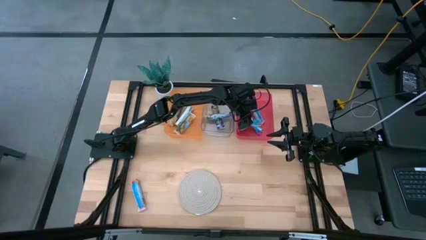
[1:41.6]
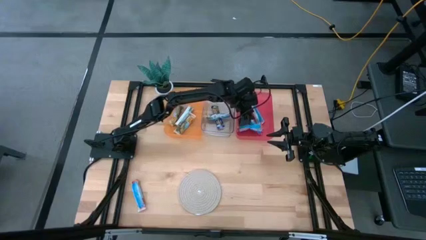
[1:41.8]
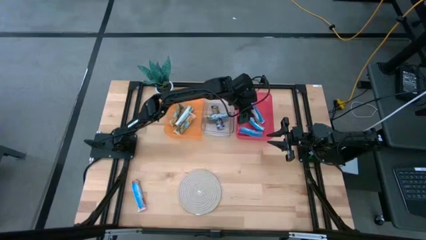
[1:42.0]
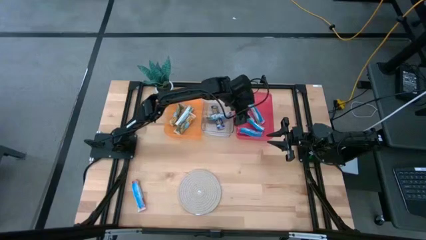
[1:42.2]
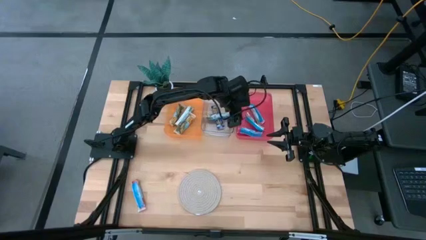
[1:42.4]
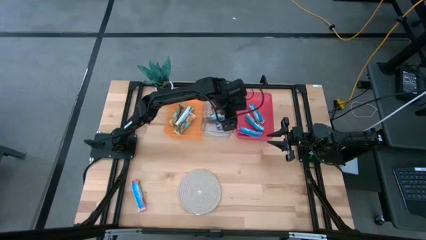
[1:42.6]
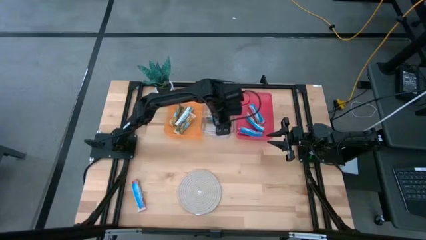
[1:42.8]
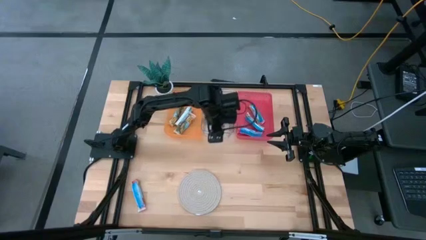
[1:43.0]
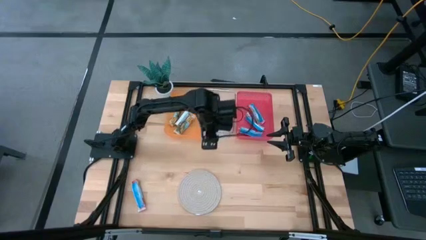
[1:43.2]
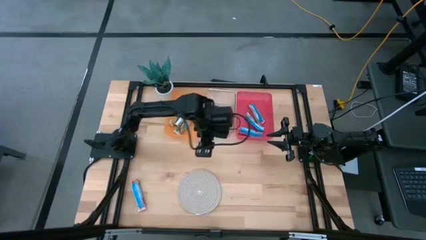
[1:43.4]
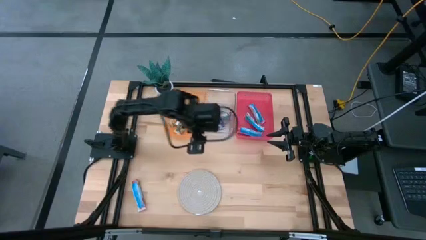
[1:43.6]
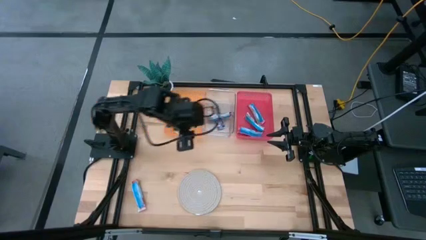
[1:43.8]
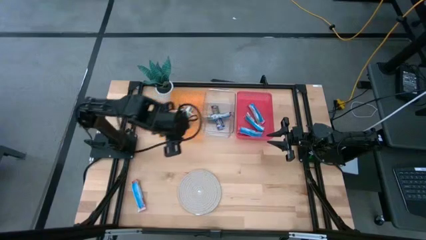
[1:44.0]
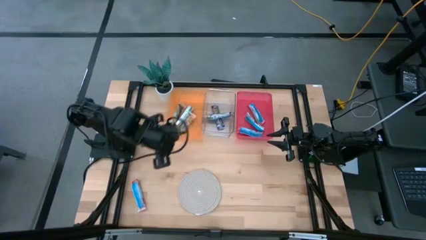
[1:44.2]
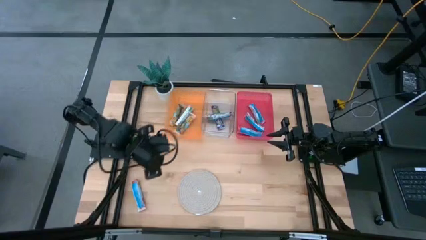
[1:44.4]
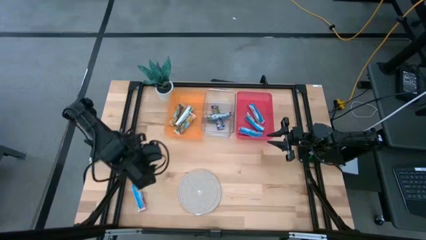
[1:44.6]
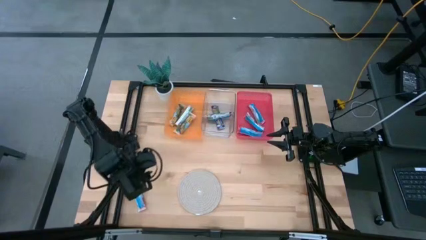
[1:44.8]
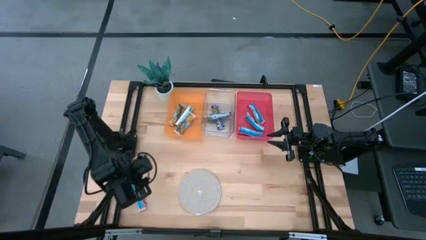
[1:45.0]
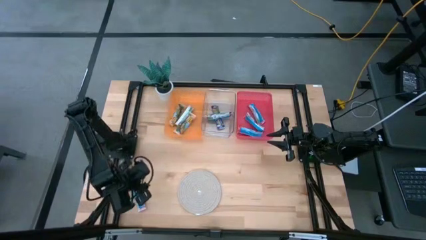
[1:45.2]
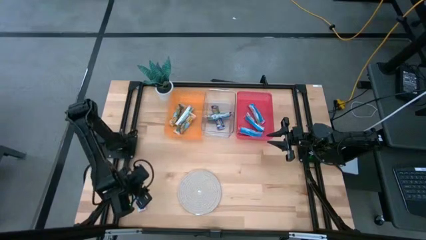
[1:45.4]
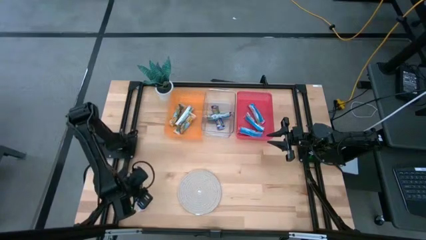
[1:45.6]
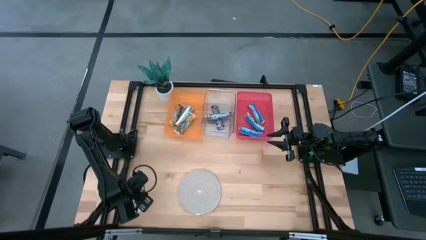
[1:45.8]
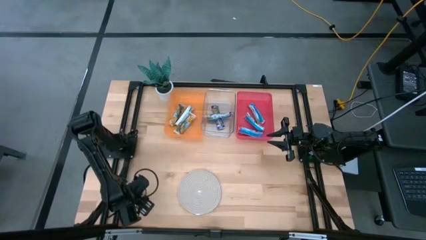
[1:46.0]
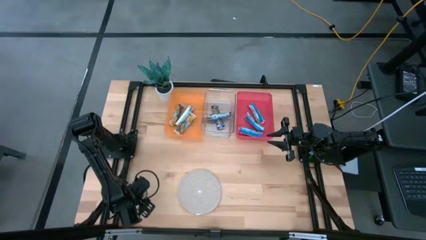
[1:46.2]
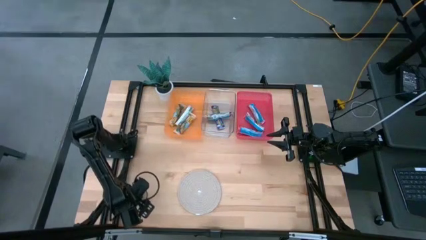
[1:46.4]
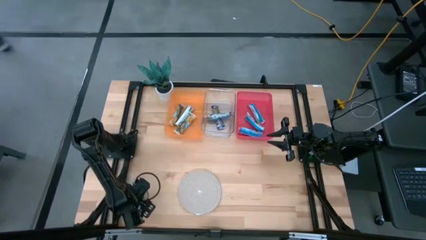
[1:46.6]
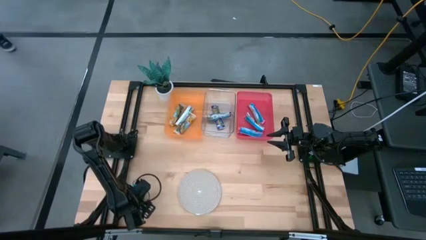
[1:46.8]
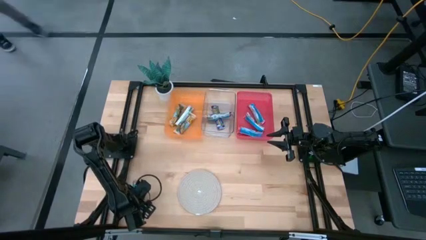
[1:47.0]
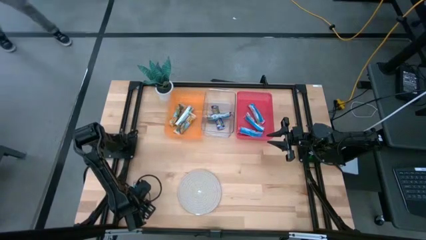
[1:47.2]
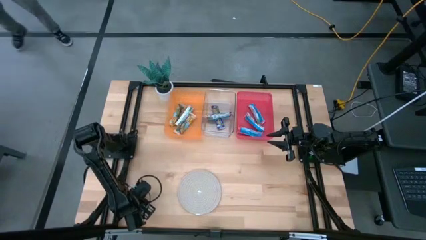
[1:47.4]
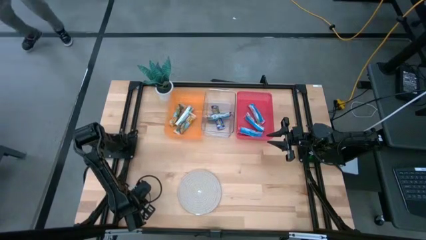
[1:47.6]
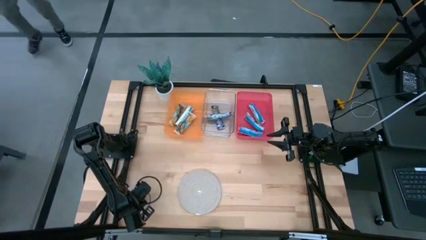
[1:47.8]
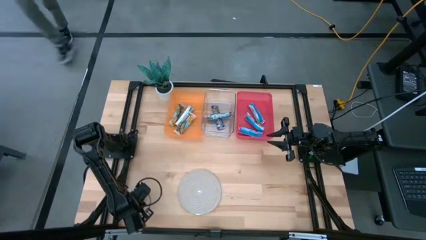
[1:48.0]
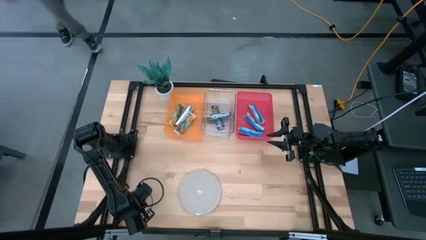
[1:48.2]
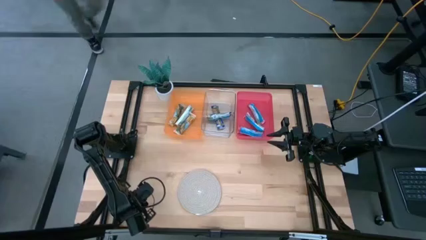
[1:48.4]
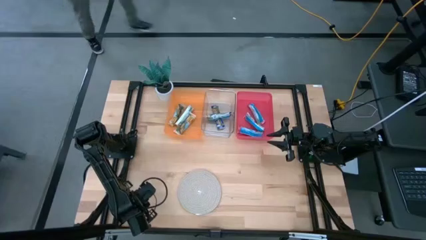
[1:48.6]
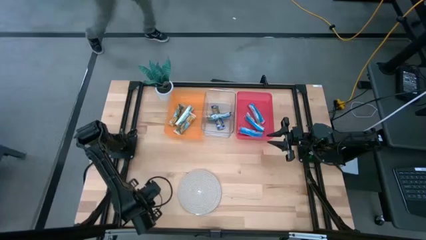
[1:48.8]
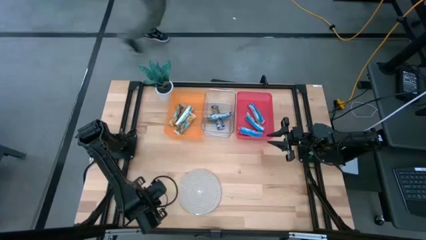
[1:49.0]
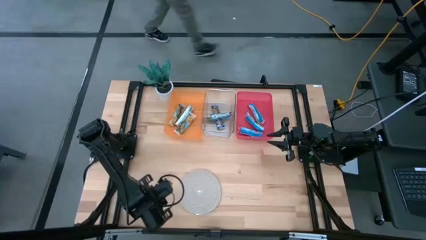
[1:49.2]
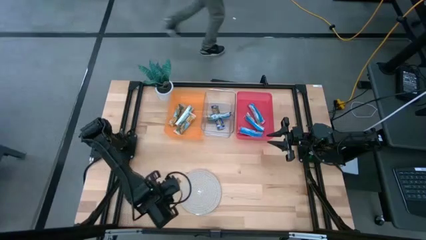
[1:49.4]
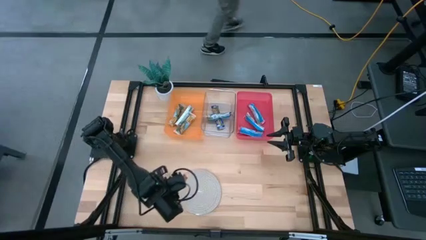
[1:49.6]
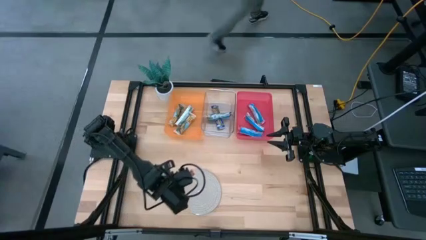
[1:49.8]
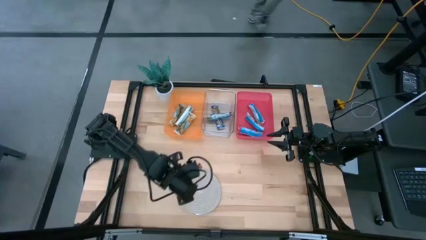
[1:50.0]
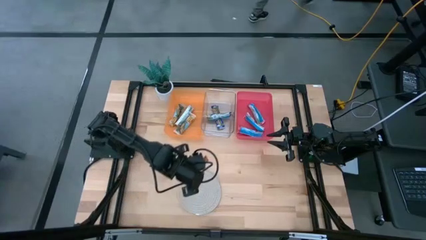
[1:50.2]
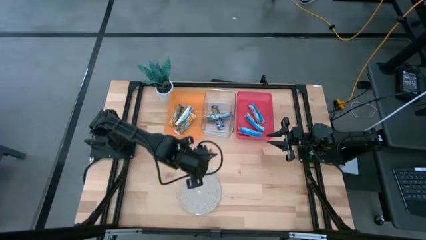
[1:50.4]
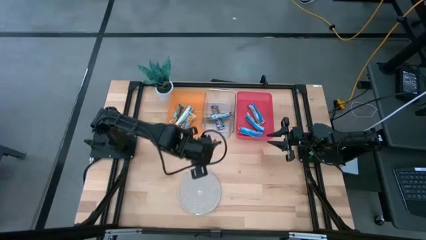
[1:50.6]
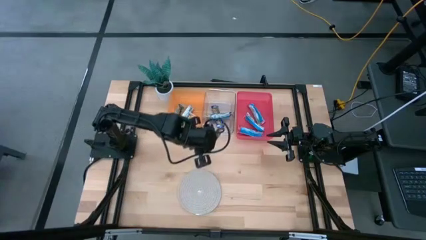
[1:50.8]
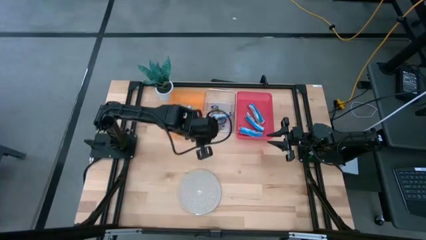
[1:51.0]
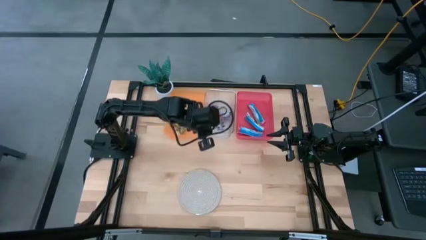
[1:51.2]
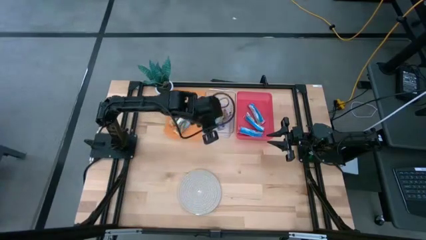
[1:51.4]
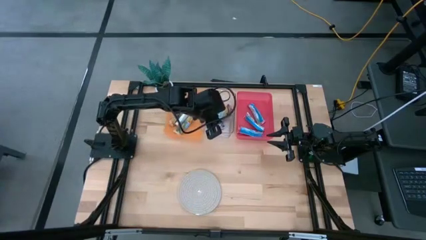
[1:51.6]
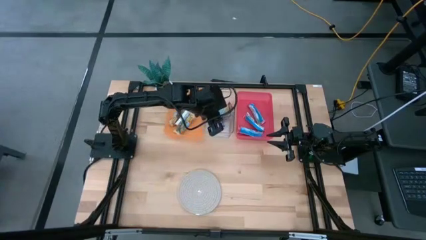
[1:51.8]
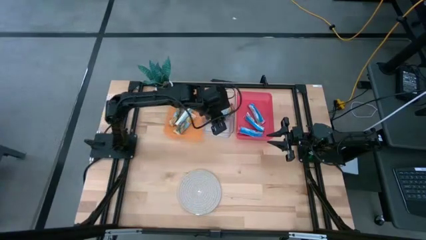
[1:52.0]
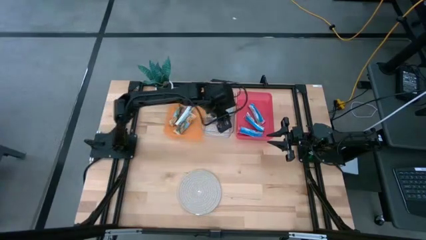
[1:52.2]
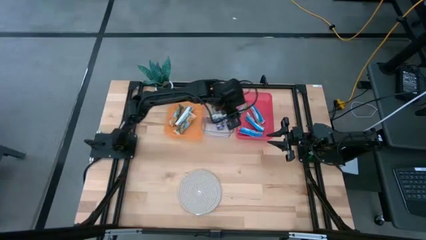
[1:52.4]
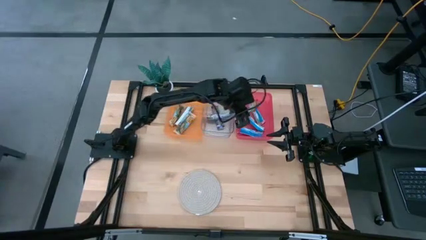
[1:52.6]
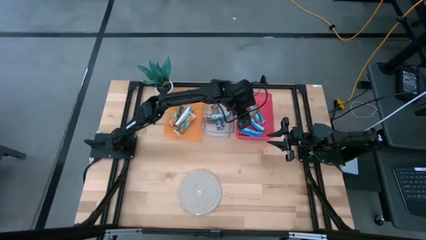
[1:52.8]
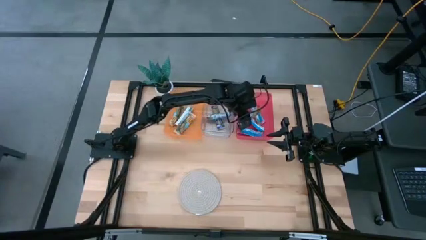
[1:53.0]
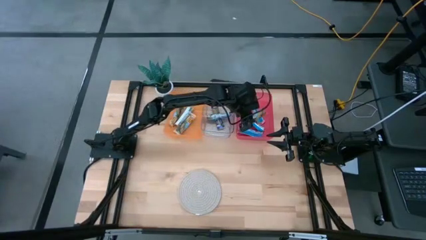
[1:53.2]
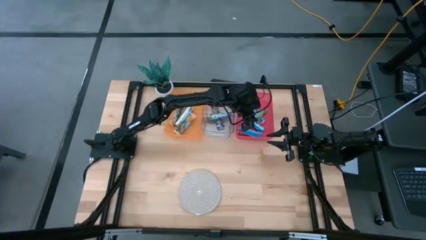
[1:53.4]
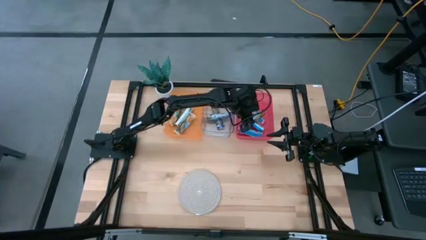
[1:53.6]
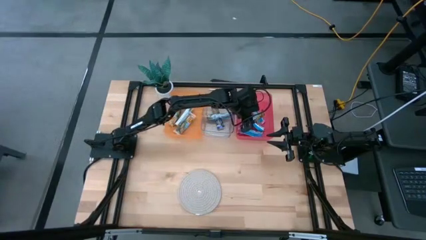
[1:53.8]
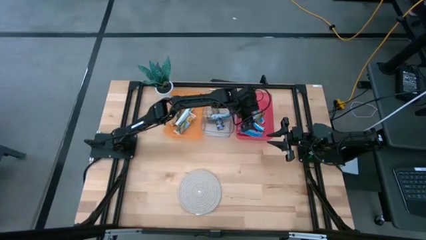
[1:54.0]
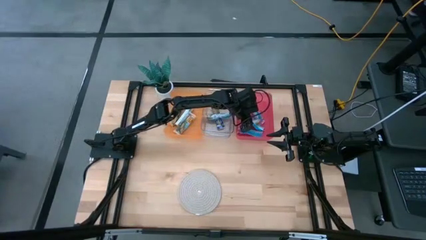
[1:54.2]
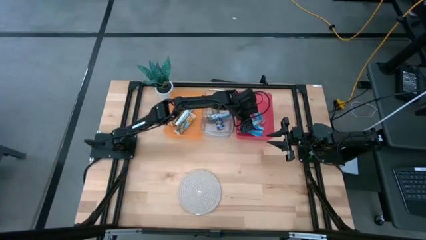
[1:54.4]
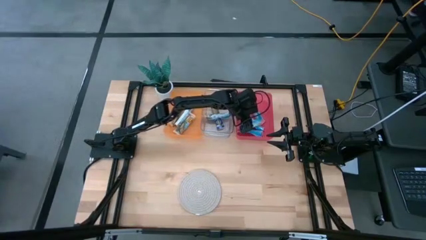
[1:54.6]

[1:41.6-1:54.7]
Task: Pick and place Granola Bars by type
Put the red granola bar into the pink bin
